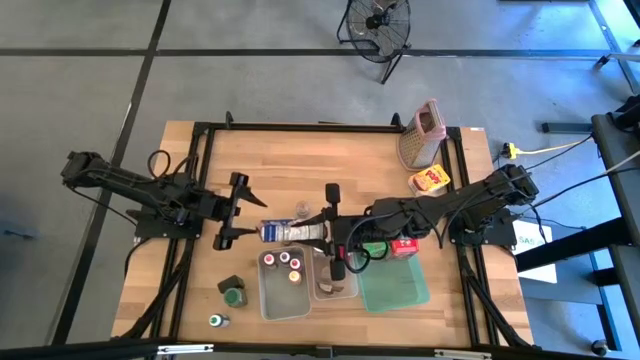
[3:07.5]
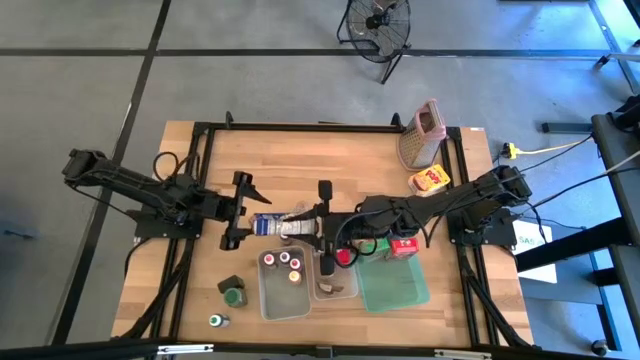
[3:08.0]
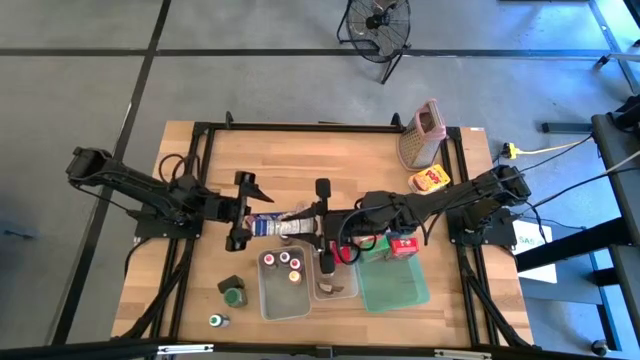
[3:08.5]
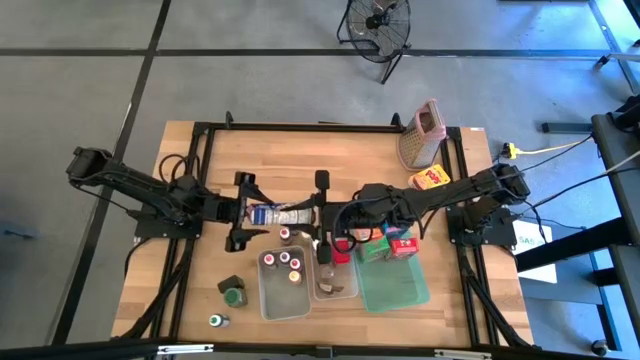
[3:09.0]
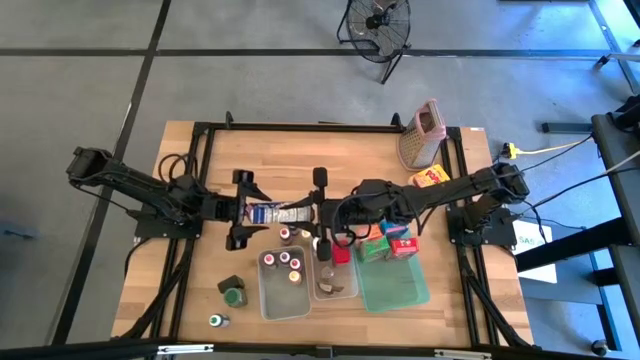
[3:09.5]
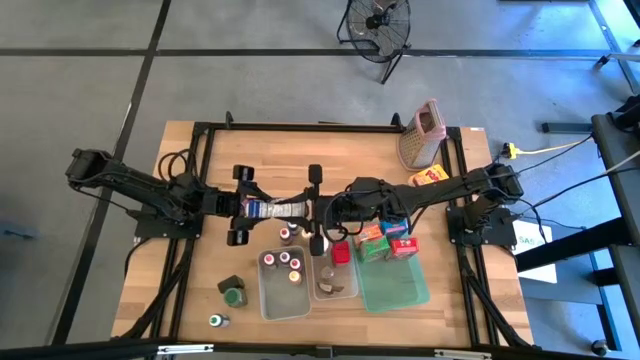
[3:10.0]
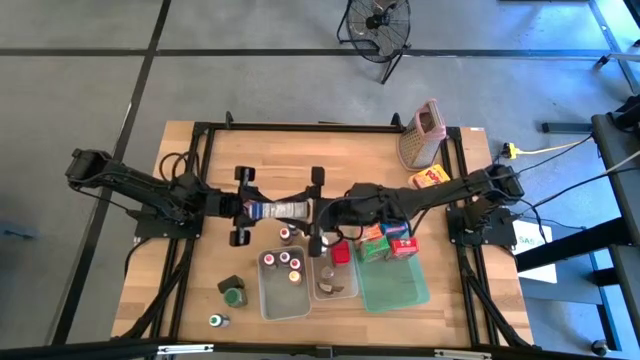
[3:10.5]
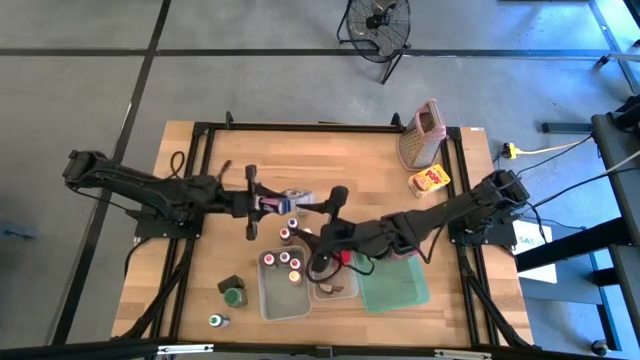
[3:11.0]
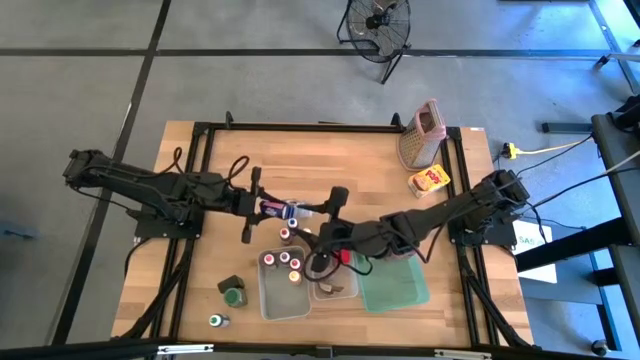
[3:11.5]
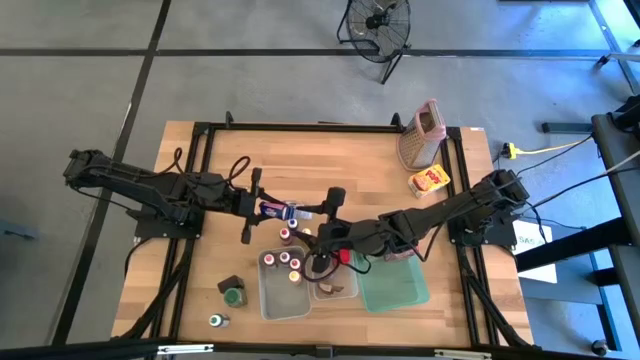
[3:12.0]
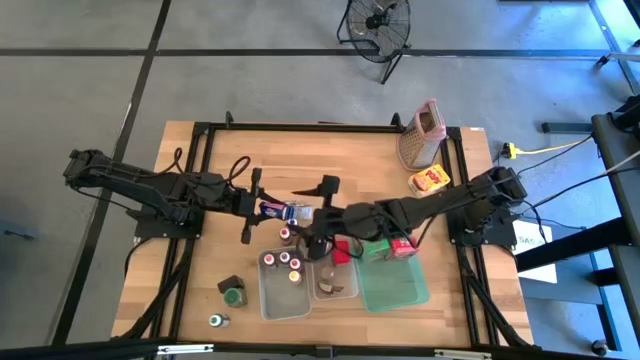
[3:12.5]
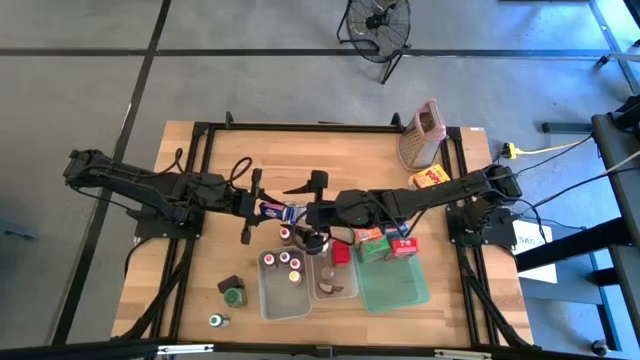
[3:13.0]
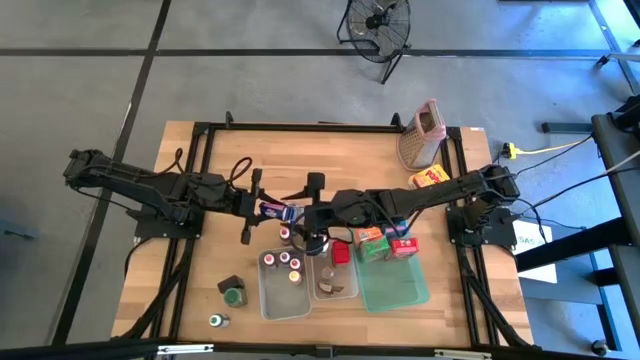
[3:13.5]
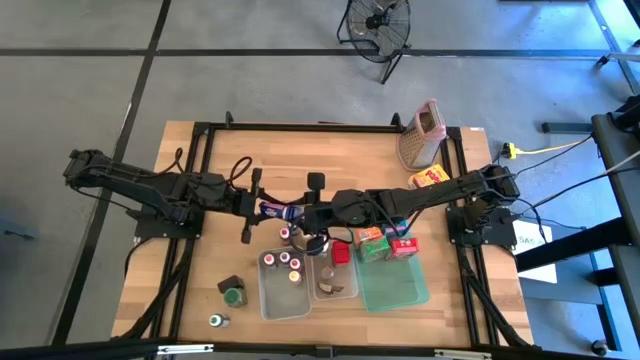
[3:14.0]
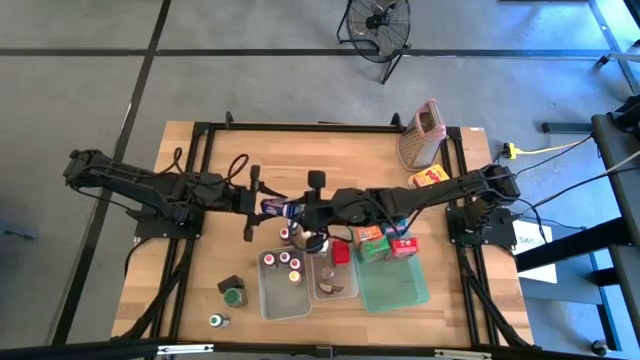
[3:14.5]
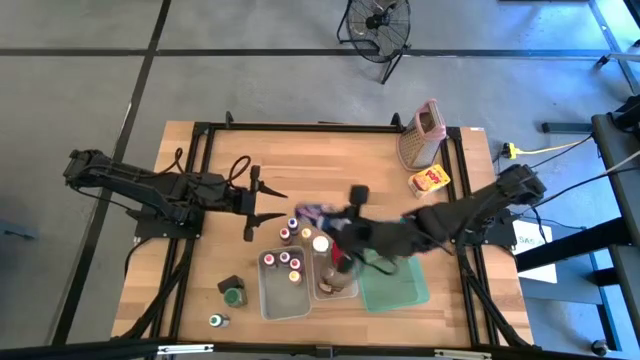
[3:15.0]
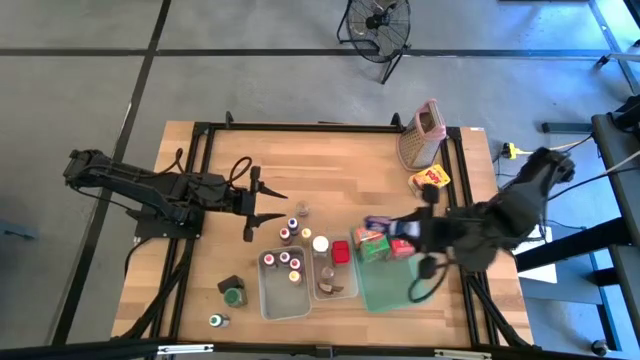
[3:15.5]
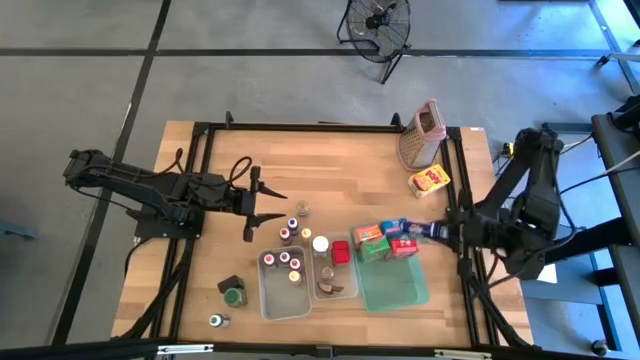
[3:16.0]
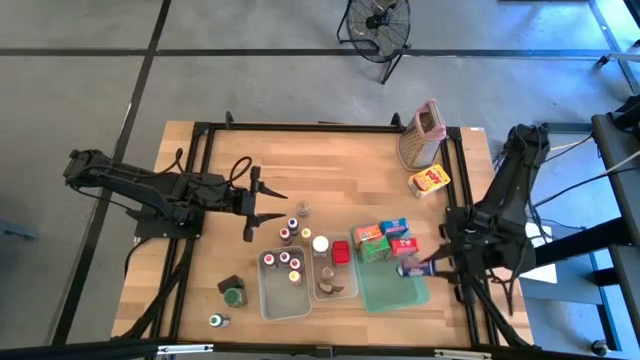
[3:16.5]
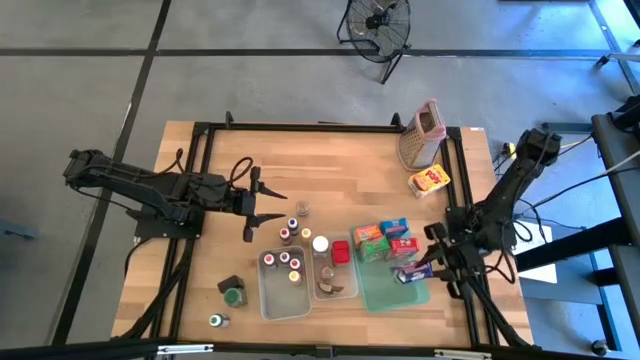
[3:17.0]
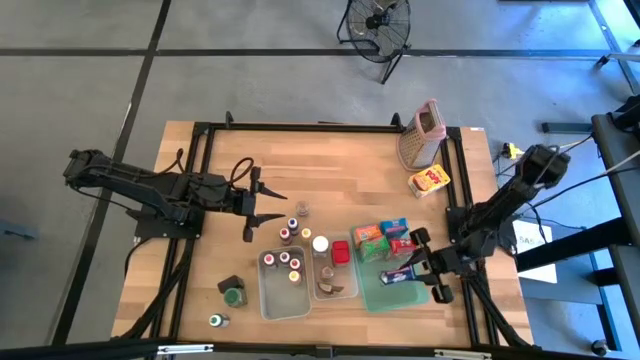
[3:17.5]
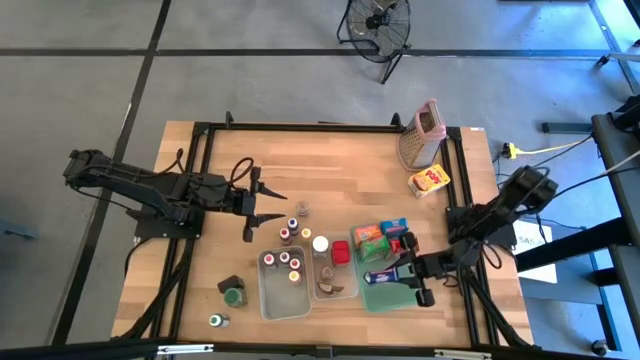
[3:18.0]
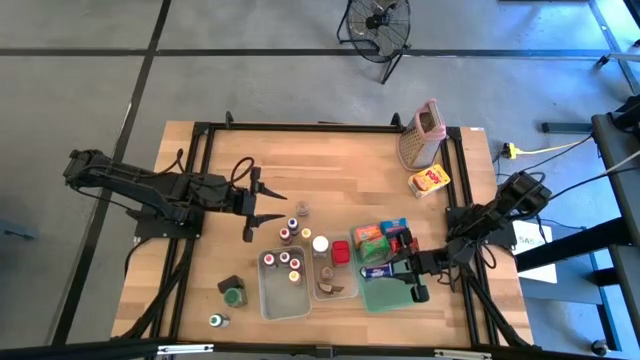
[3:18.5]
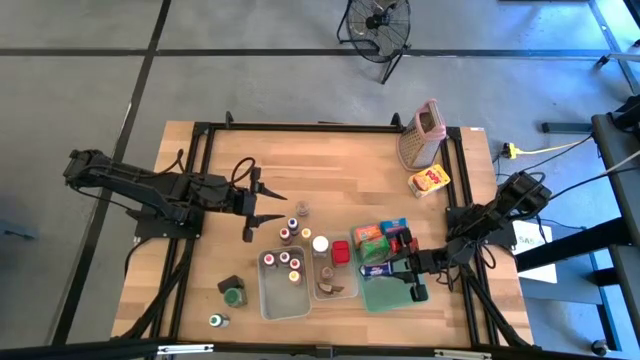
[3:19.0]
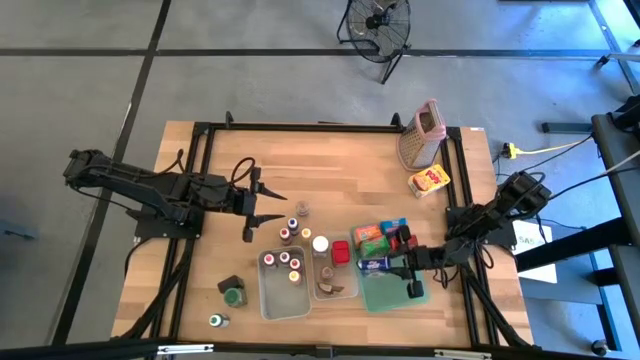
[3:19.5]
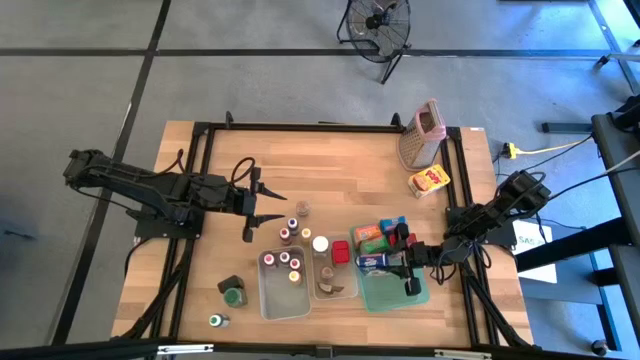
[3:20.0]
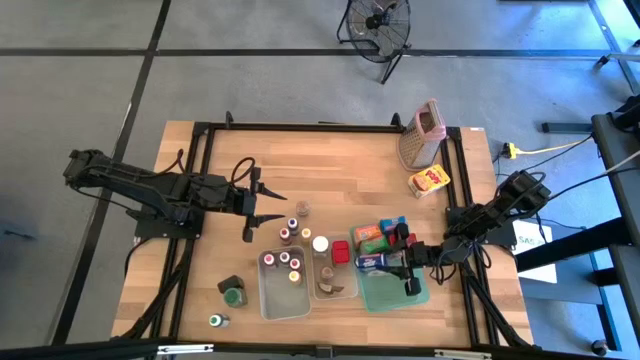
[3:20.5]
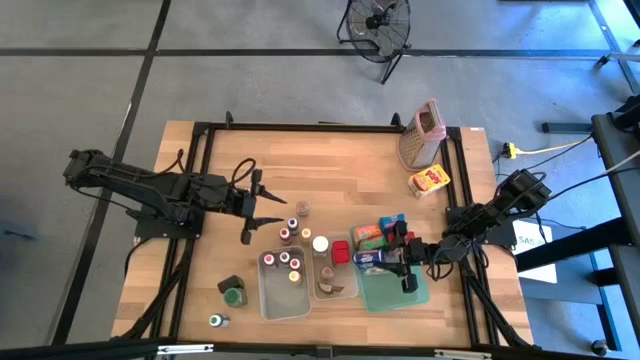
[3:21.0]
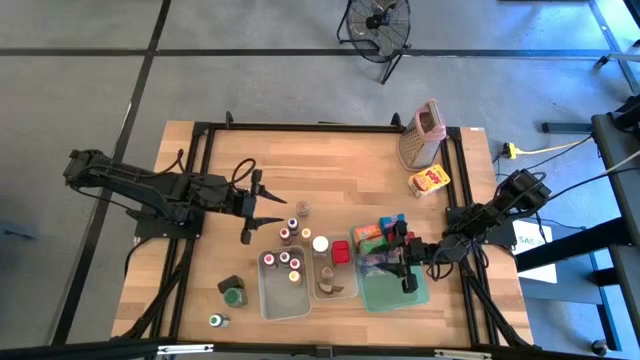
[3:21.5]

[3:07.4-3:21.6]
Task: Pick & Place Kitchen Items
Put the blue cereal box into the blue bin

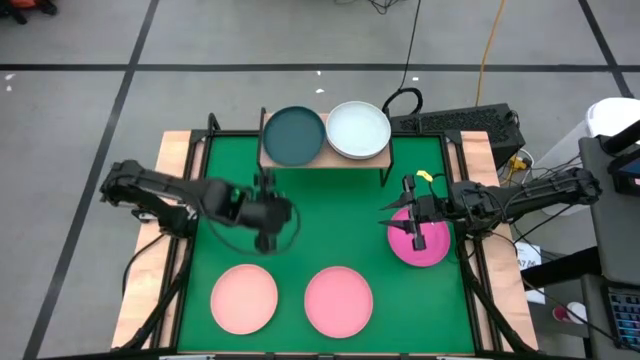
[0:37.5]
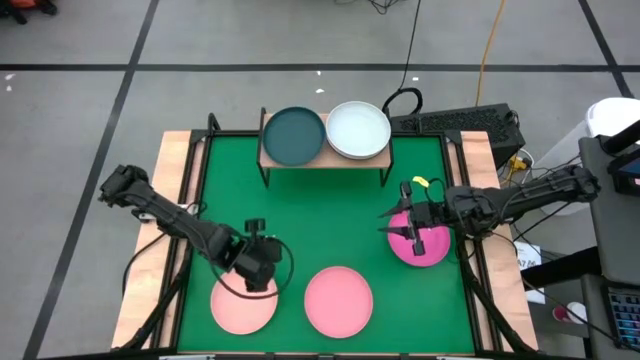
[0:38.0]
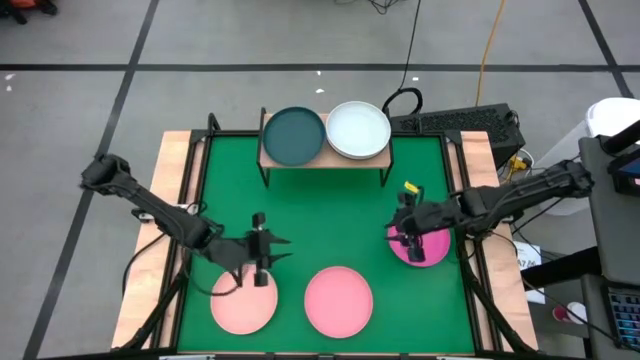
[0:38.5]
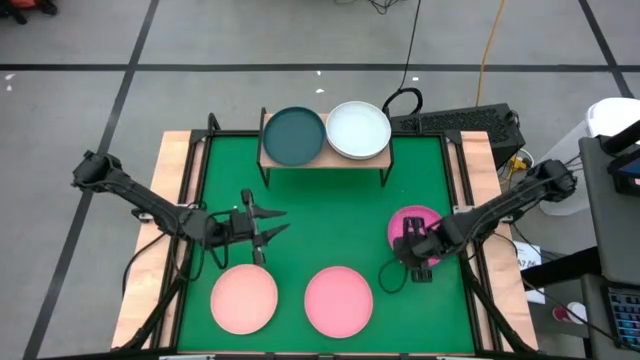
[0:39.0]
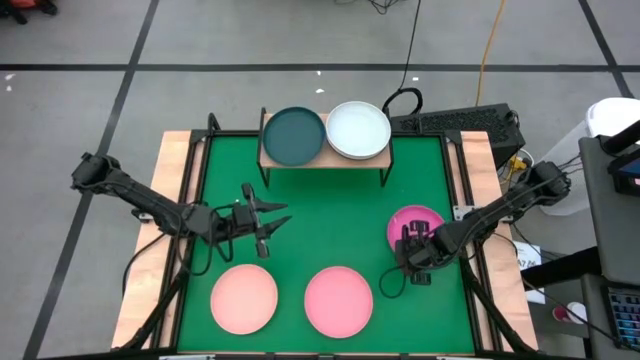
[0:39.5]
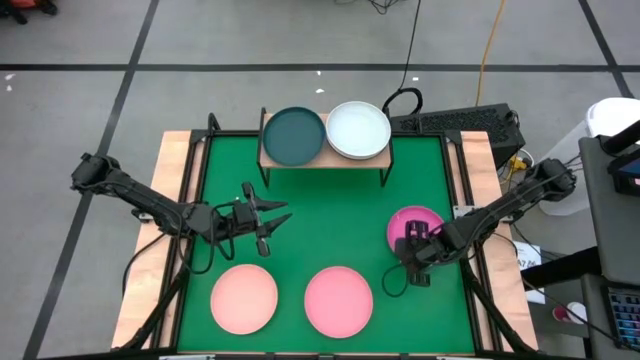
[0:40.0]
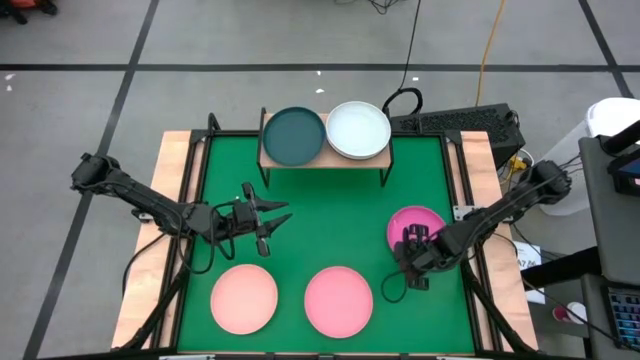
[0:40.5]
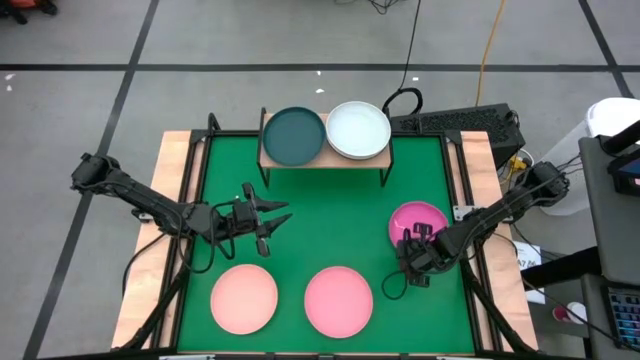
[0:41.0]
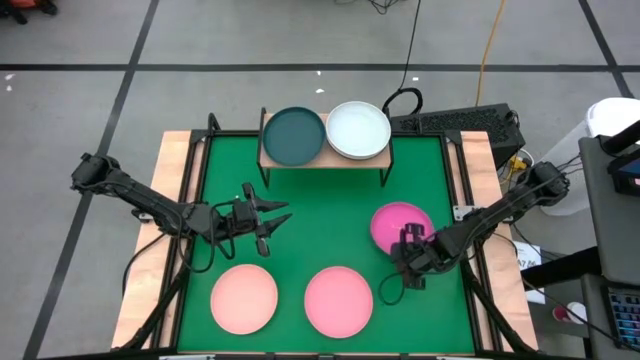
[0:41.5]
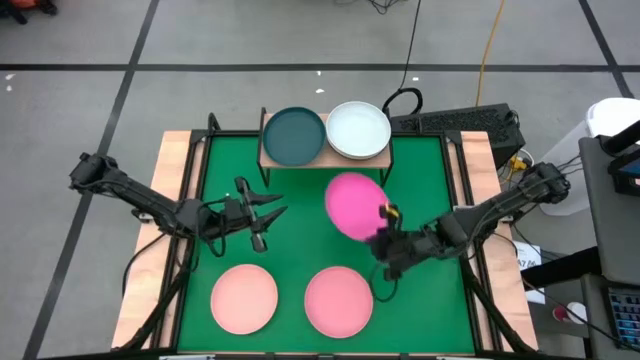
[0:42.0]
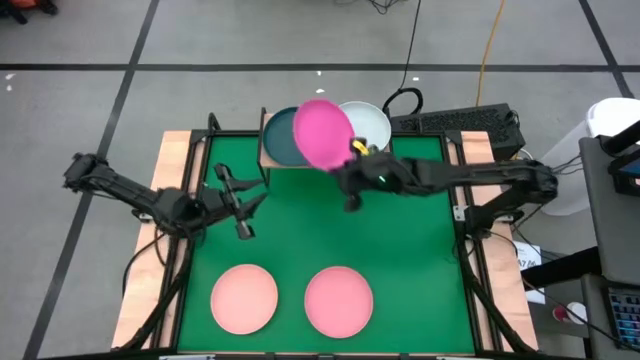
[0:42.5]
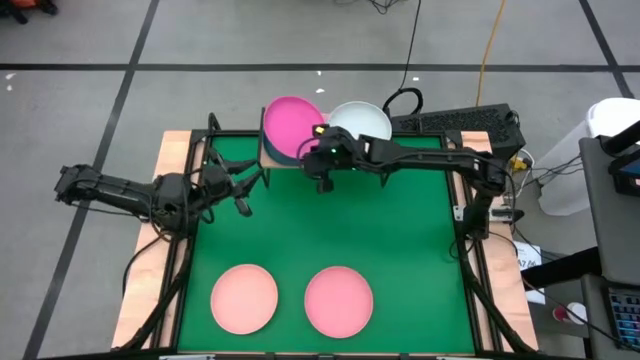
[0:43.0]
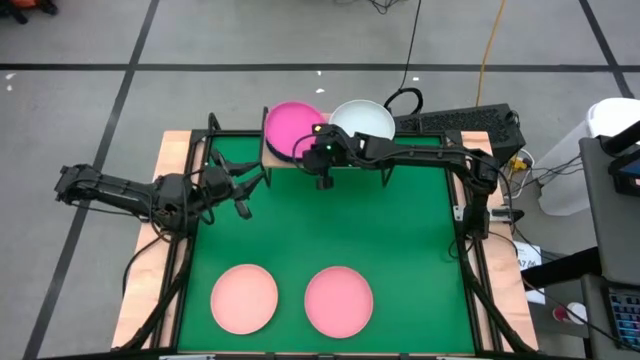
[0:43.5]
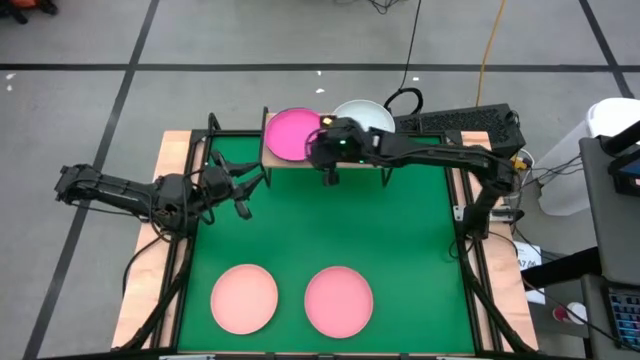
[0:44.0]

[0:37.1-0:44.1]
Task: Place and stack plates onto a shelf
Stack the pink plate on top of the black plate on the shelf
